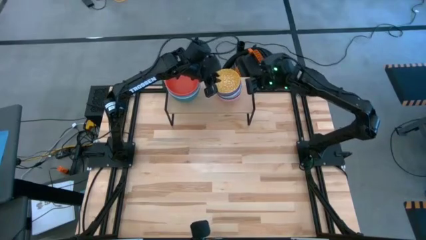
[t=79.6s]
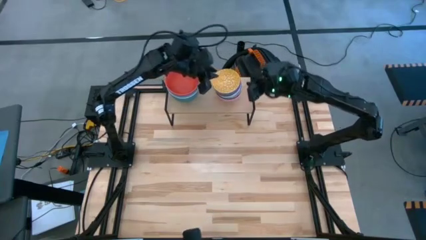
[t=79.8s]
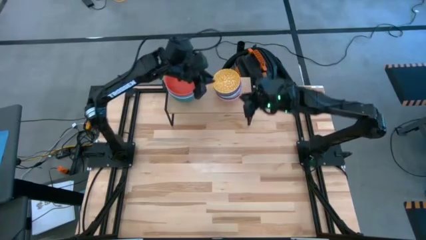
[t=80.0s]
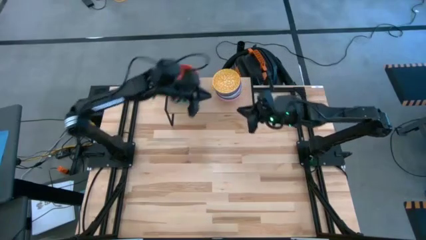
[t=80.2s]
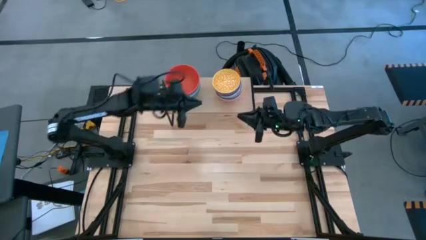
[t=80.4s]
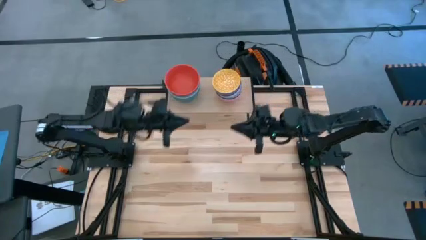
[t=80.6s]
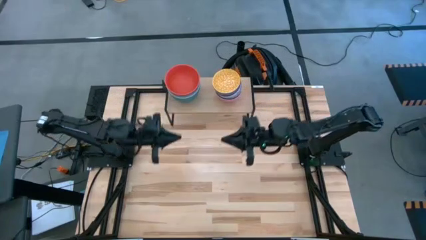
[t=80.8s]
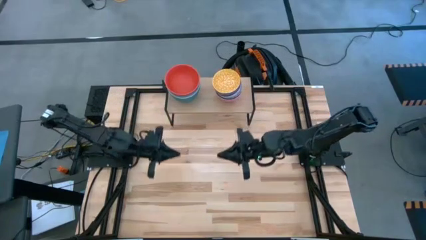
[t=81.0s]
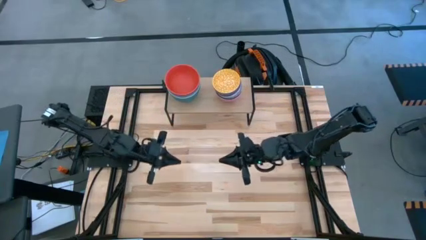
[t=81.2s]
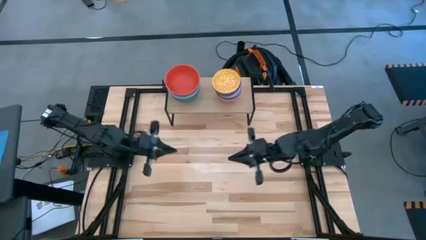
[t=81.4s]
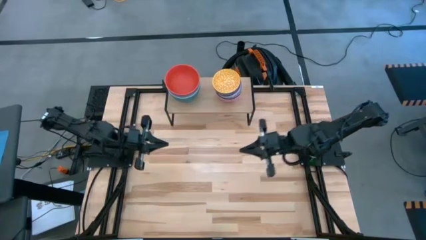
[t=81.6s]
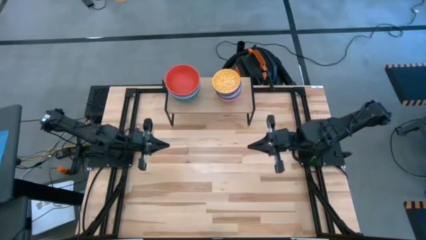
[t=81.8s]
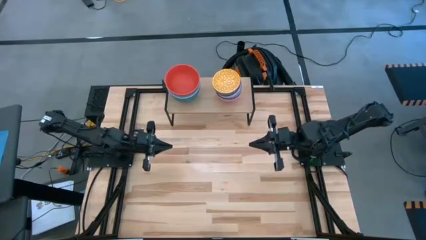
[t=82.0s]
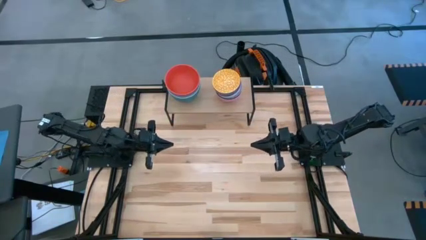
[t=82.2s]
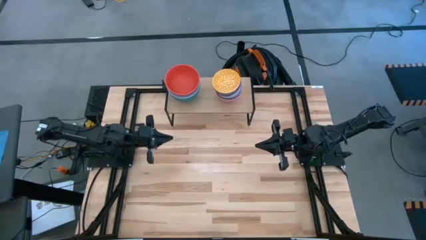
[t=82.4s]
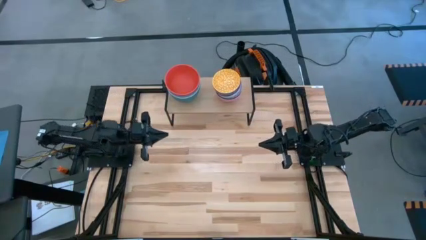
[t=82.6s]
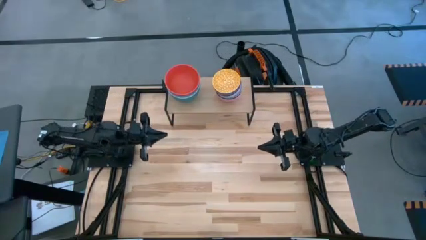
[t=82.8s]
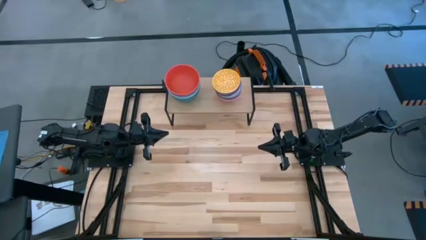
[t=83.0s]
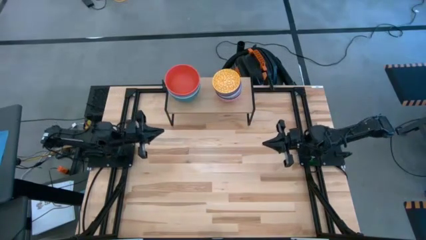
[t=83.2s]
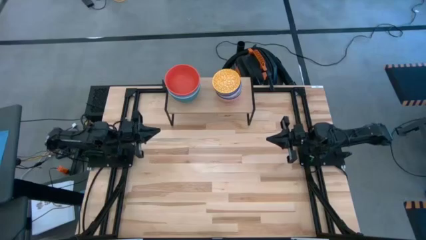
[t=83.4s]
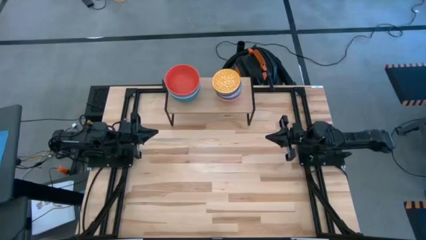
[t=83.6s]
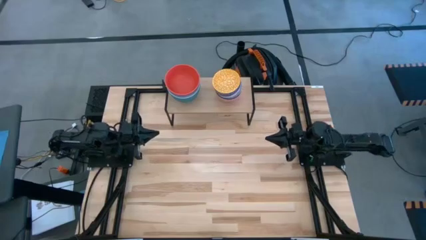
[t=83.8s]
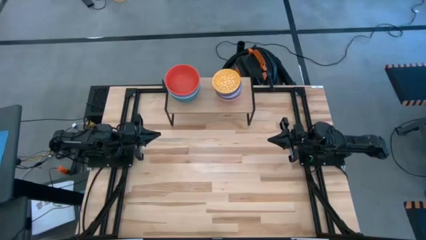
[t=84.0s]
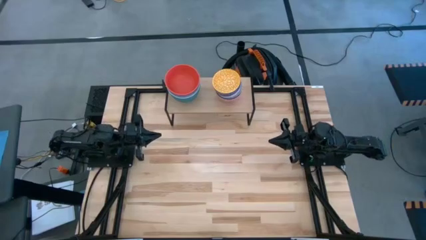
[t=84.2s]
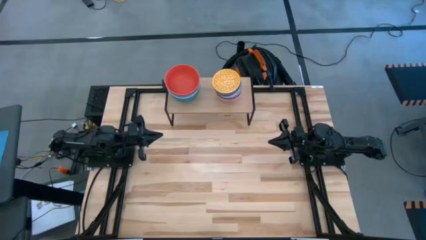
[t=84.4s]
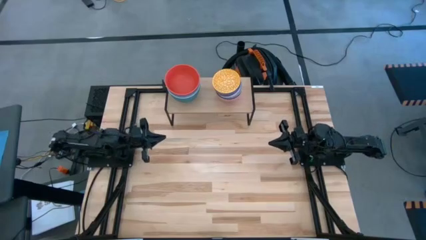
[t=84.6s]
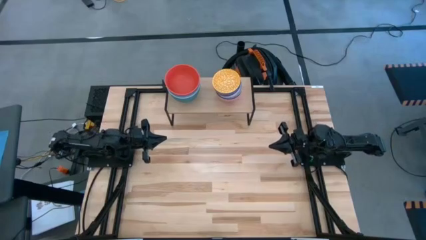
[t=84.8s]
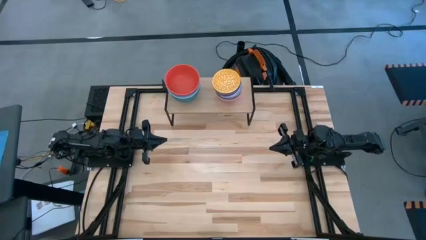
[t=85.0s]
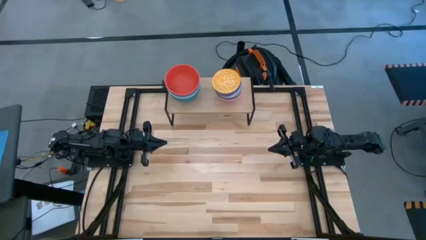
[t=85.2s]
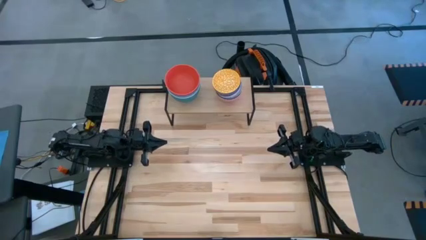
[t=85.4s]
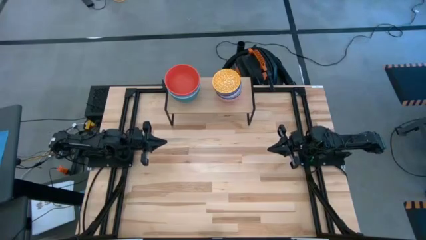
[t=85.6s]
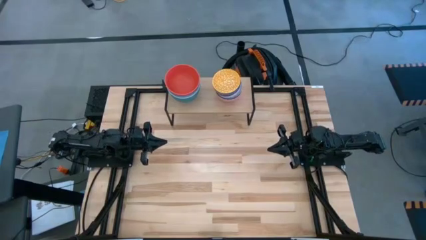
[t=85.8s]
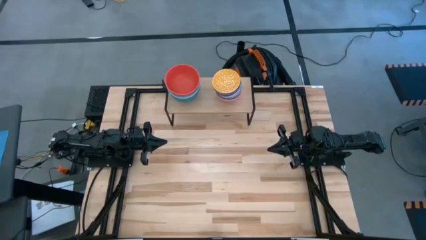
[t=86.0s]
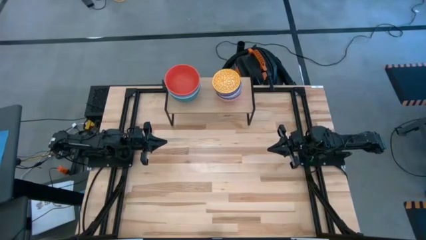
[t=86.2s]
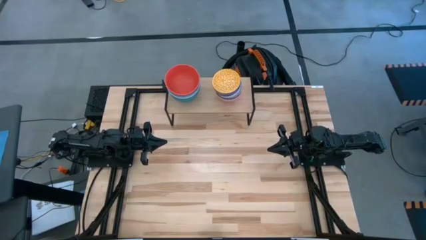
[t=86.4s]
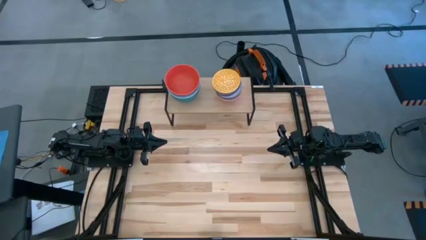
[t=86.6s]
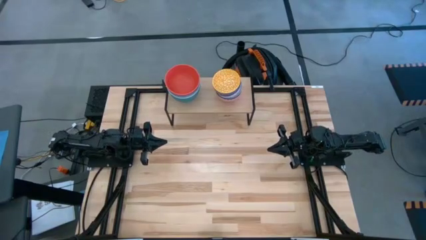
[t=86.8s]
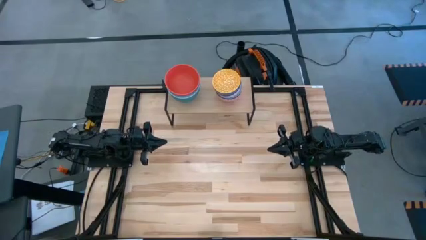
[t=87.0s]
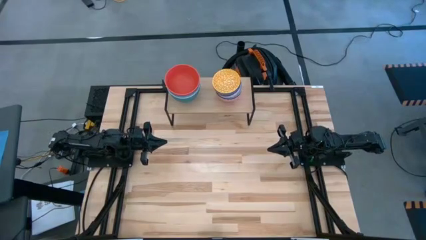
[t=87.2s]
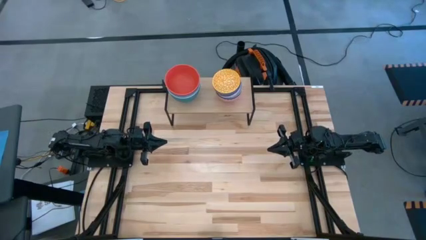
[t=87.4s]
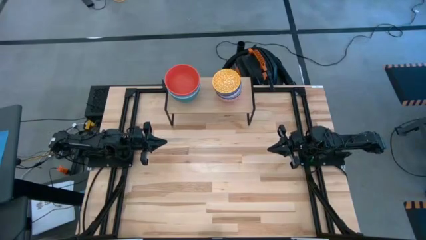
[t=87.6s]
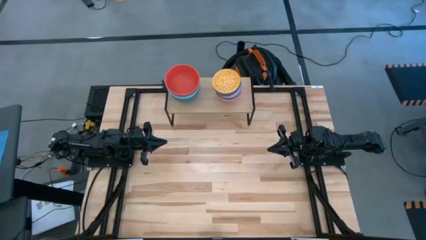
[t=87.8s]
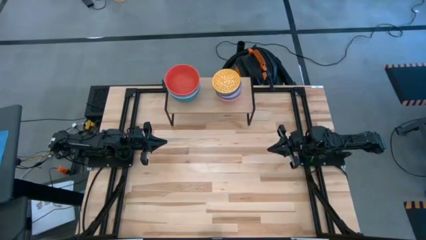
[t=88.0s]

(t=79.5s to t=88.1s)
Task: Place and stack bowls onto a shelf
Return to Home Position

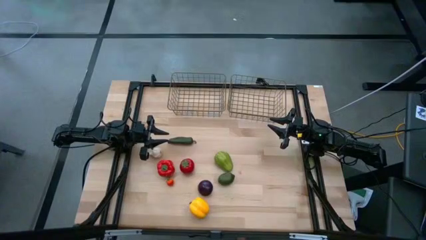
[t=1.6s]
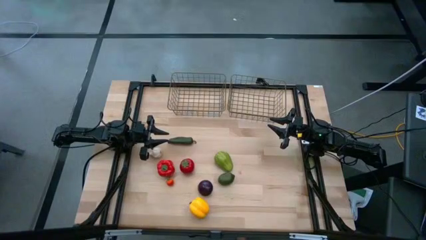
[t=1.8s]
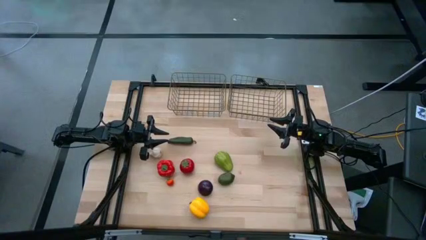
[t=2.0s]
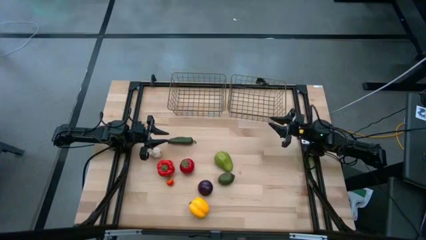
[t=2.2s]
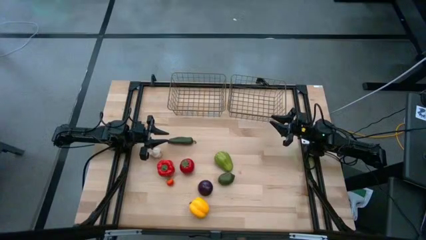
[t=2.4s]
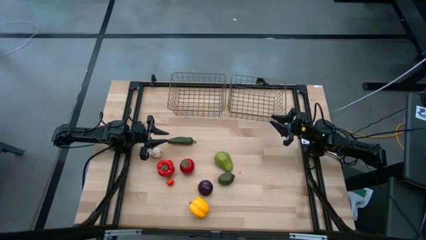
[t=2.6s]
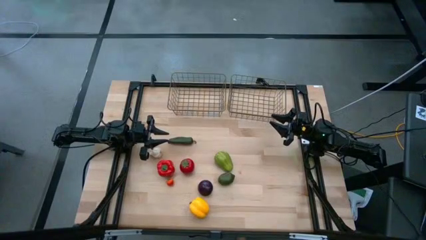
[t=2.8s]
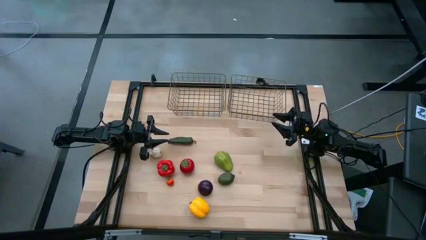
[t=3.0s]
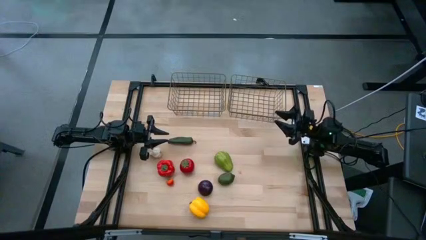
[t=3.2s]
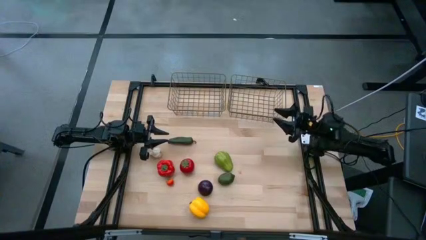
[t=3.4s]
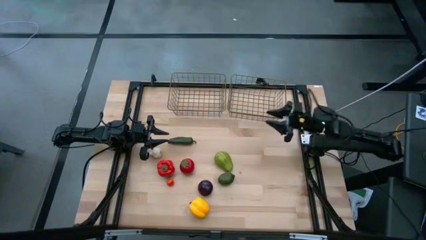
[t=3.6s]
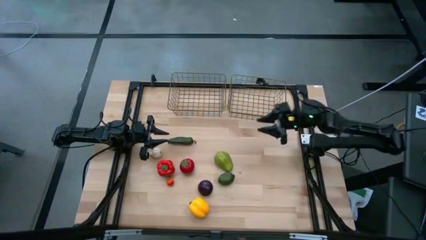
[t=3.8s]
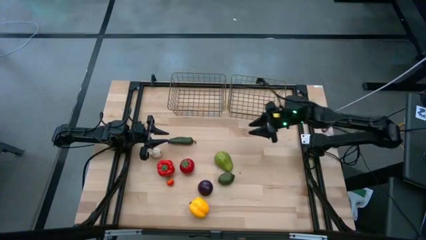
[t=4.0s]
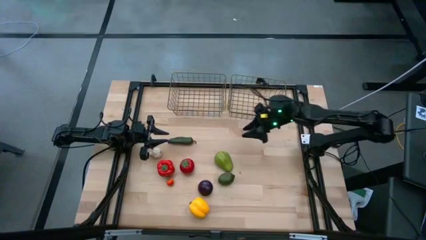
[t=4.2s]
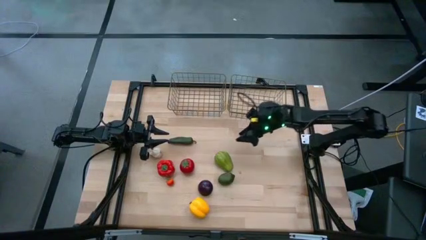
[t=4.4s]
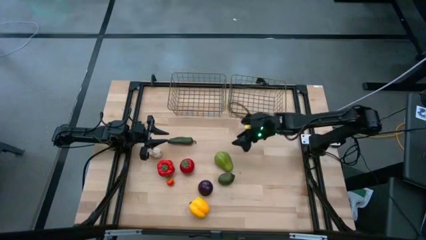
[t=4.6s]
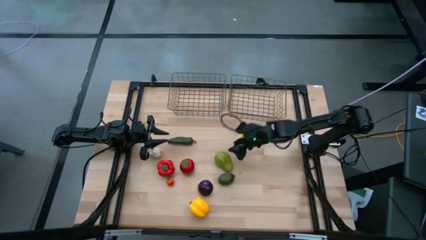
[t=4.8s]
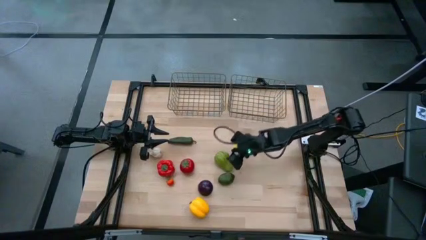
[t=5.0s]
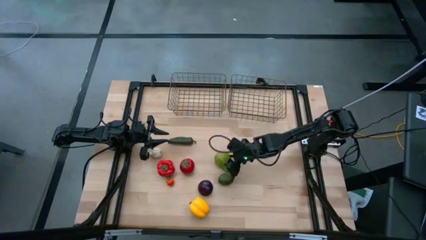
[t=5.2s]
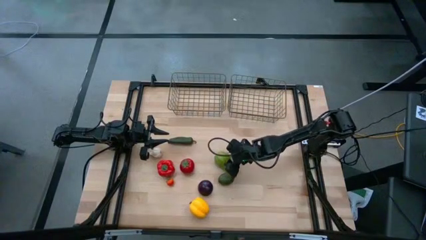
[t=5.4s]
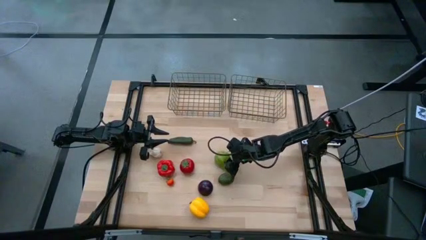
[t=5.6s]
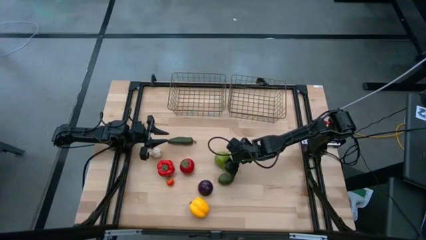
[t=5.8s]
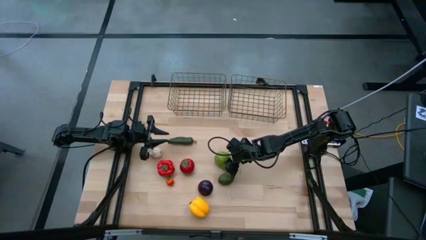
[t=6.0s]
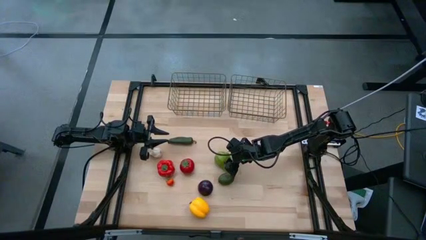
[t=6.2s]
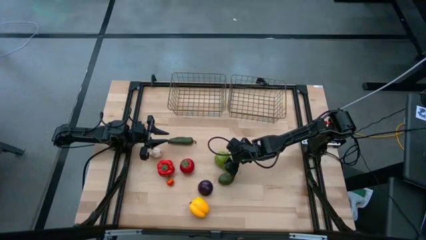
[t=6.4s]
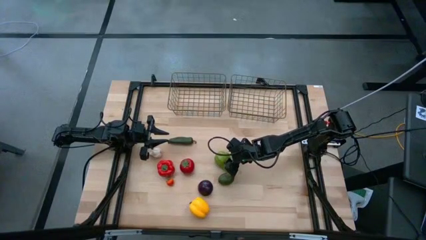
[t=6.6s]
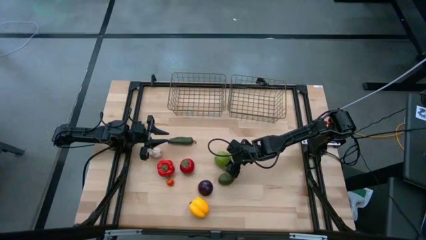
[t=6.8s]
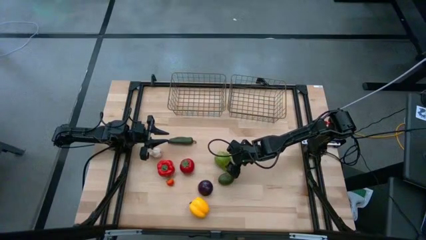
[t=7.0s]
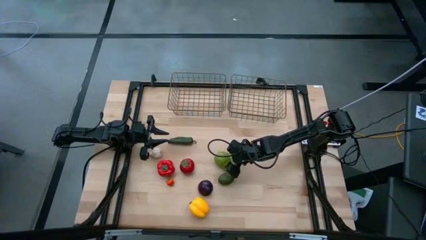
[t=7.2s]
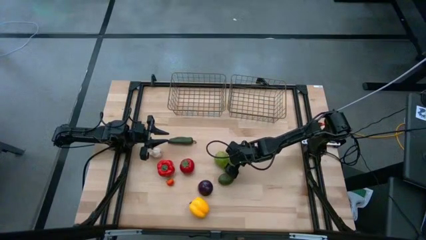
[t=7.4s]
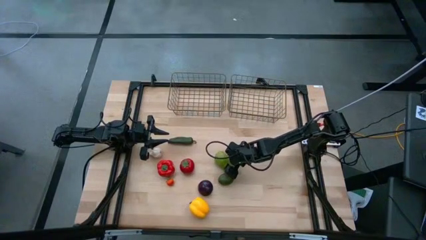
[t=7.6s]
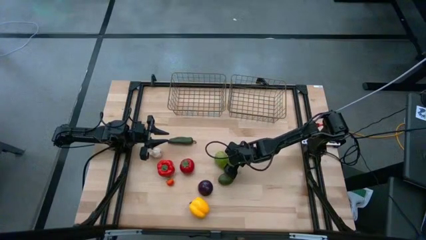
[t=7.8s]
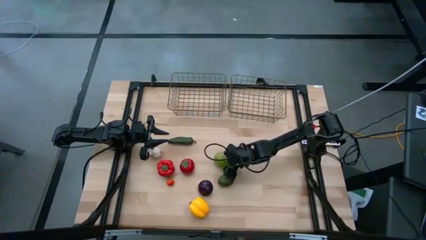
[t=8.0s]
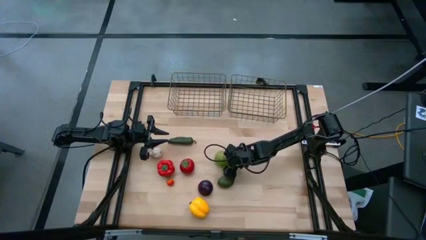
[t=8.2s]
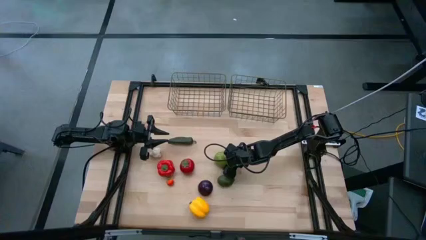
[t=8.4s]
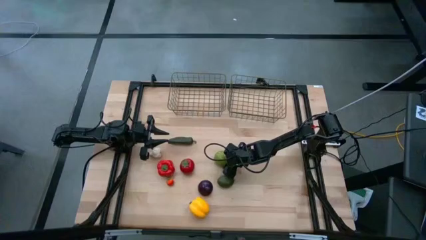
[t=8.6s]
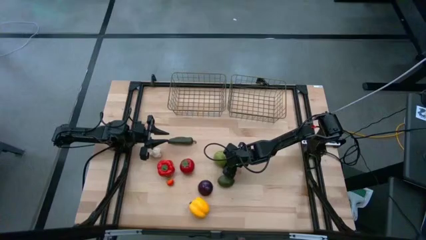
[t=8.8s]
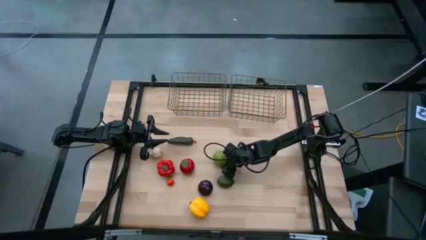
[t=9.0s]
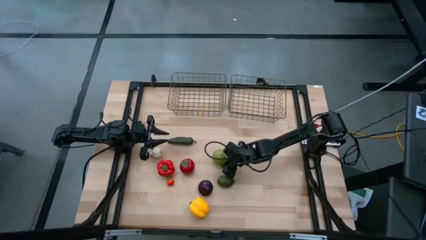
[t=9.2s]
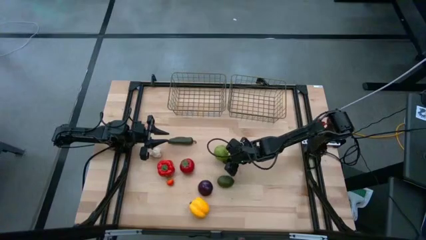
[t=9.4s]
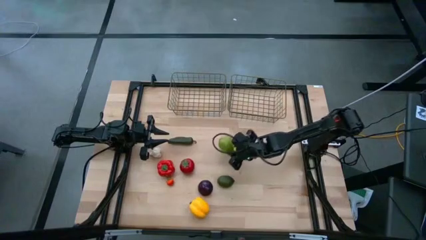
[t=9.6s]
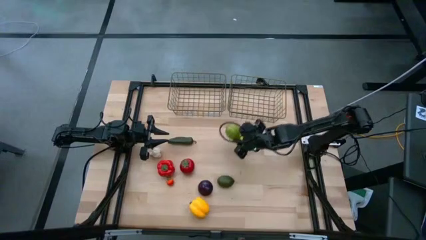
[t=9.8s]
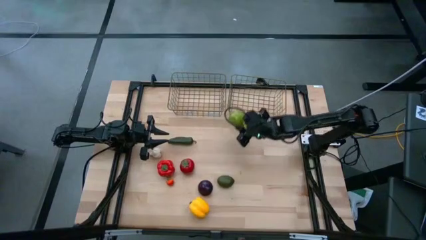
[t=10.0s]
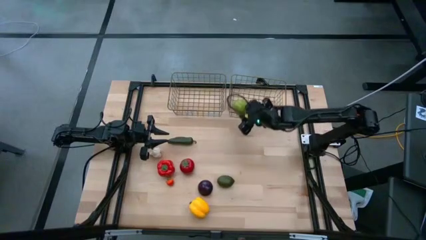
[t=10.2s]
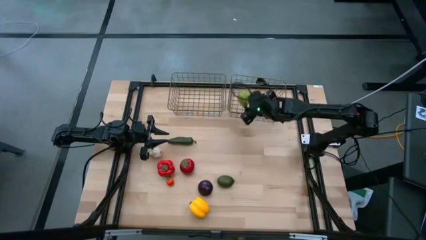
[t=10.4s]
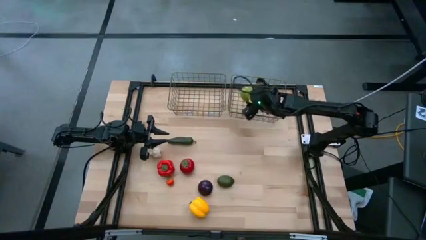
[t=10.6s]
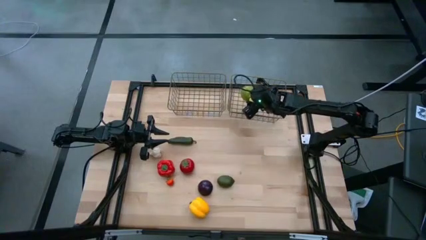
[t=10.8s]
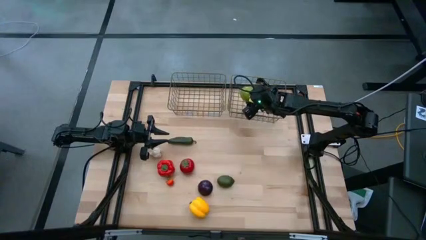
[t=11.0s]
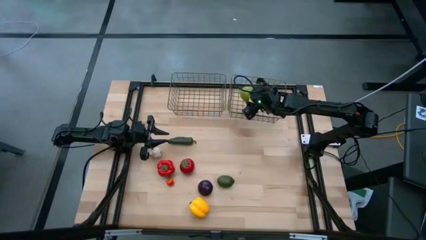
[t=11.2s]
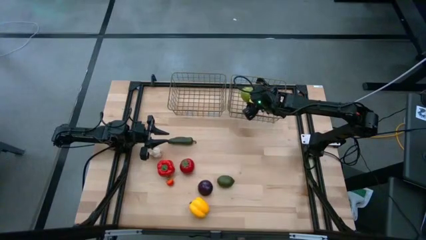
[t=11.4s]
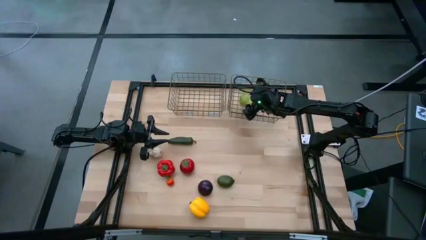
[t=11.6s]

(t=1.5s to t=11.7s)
Task: Sort produce into baskets
Put the green chayote into the right gold wire basket
